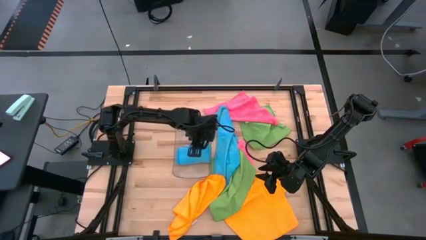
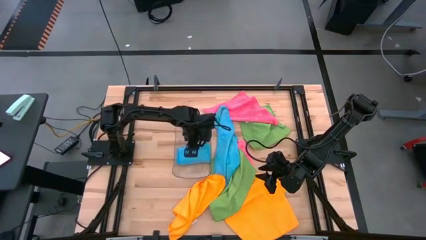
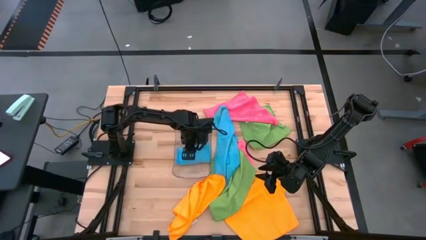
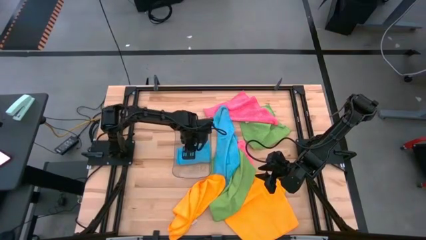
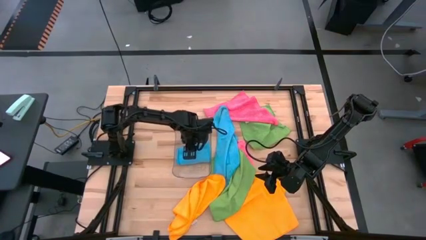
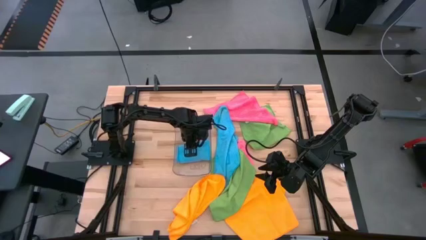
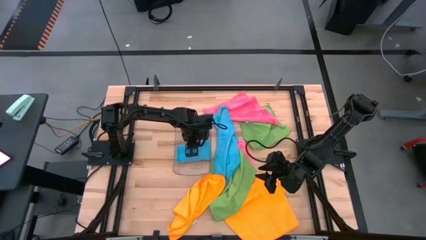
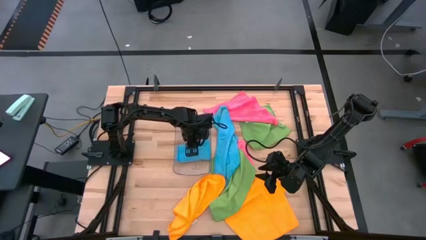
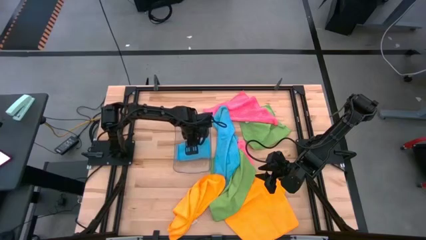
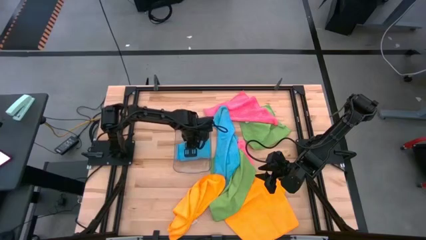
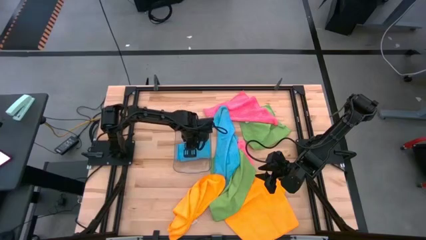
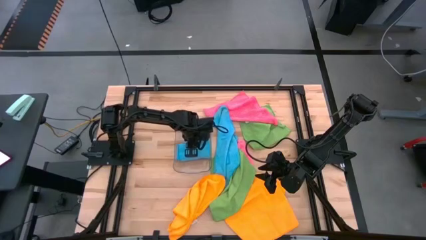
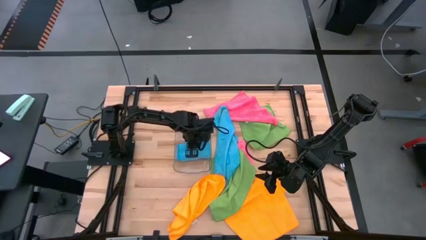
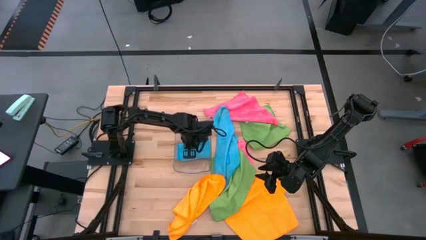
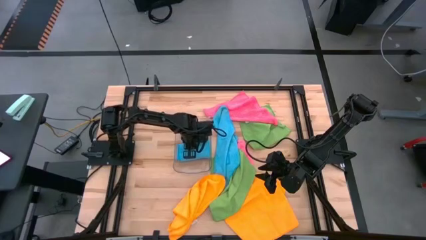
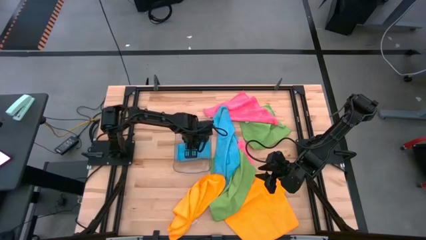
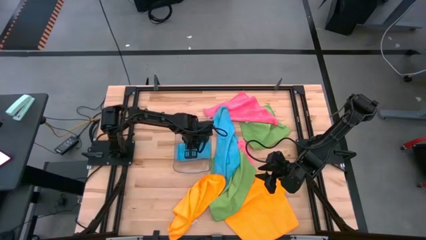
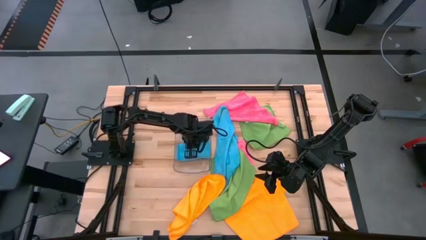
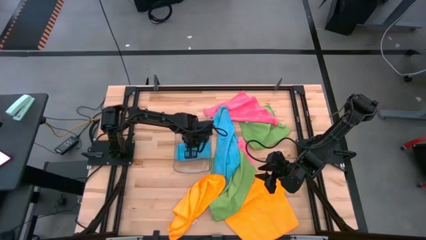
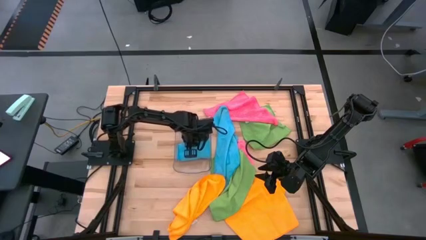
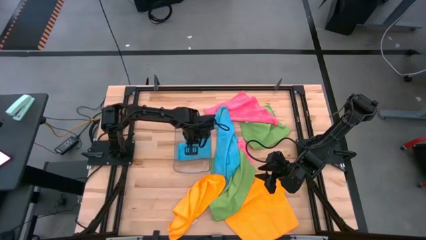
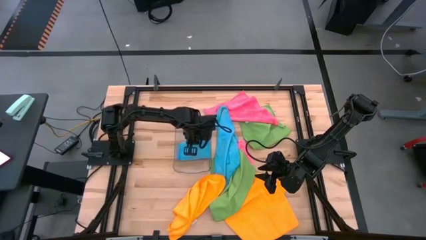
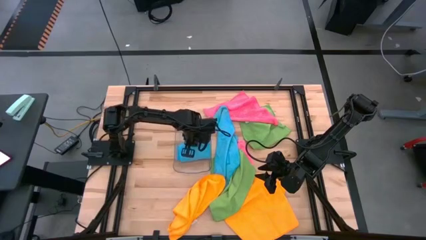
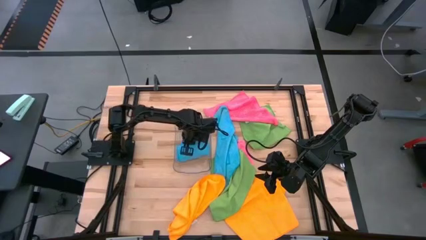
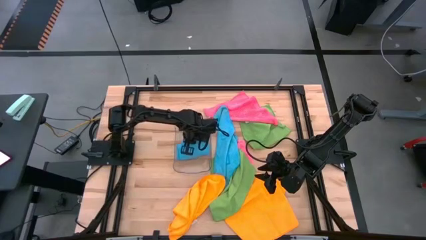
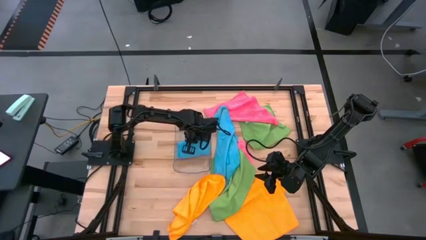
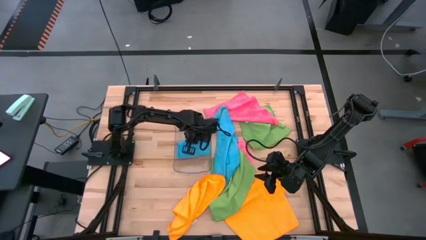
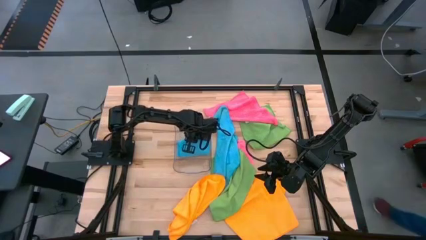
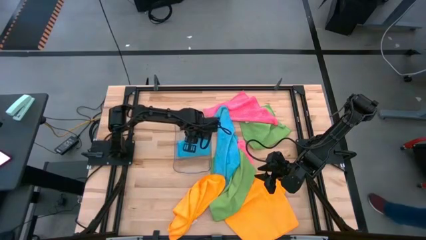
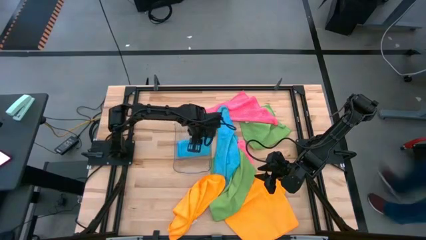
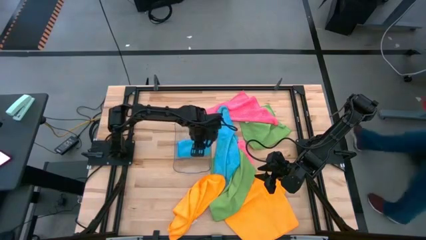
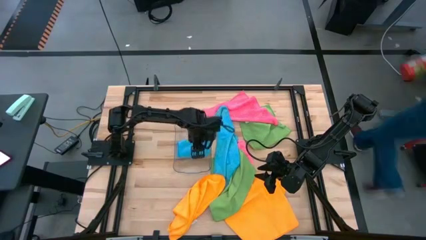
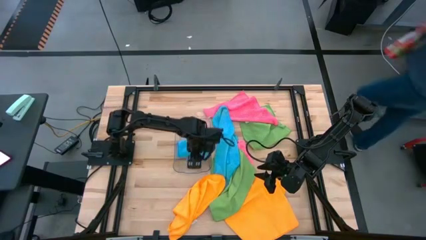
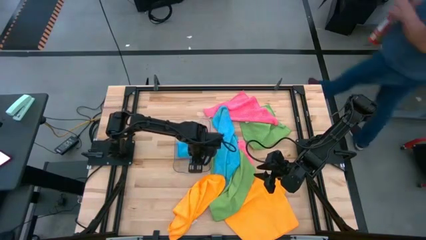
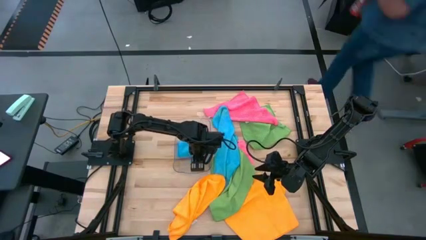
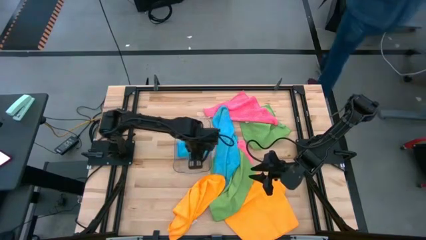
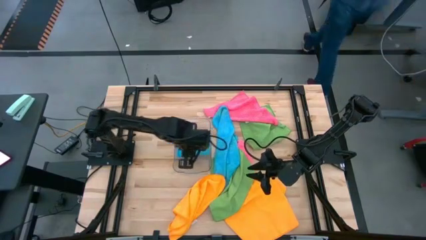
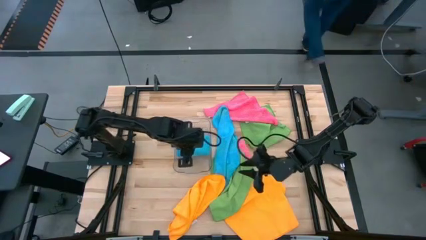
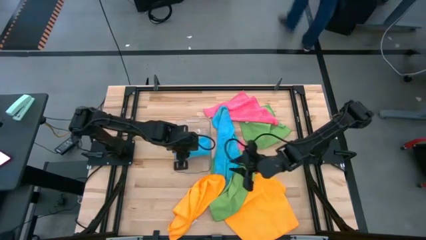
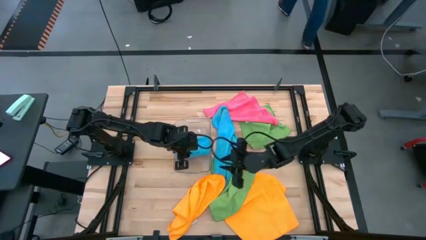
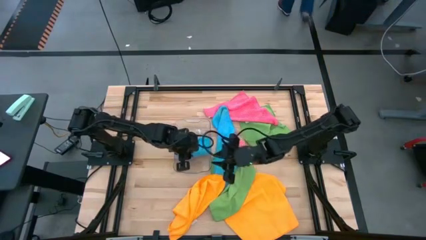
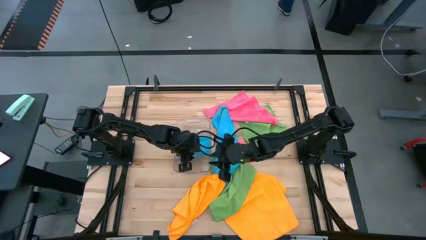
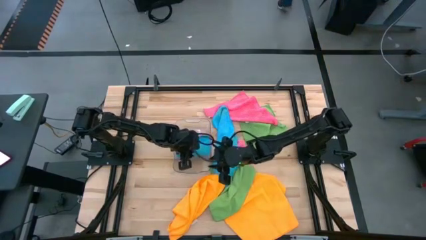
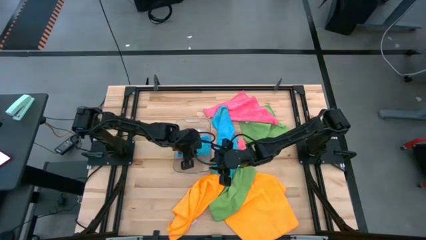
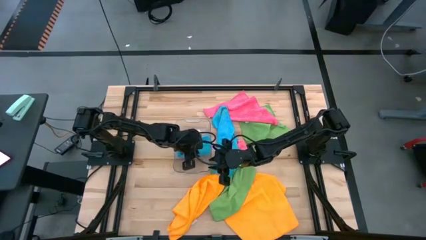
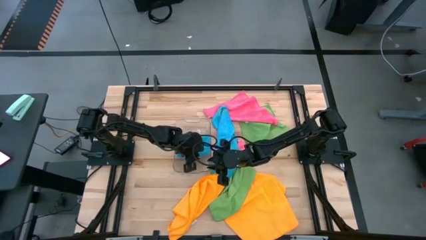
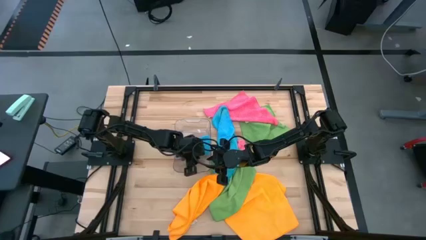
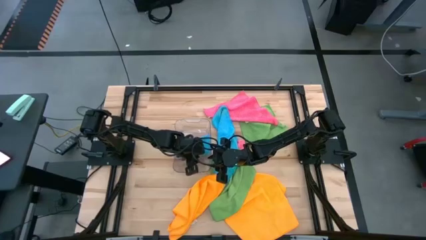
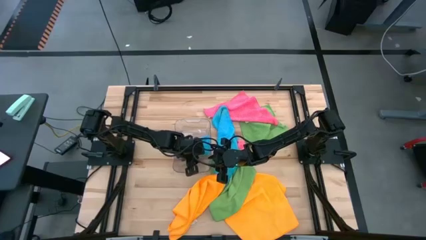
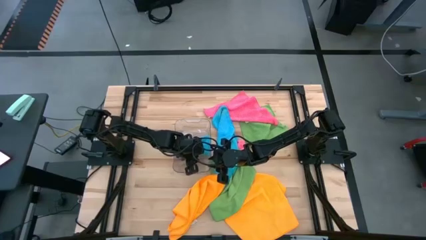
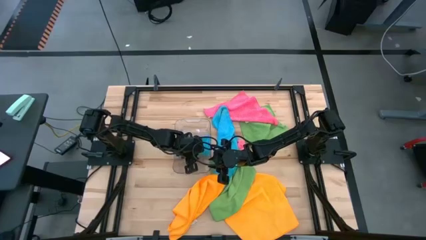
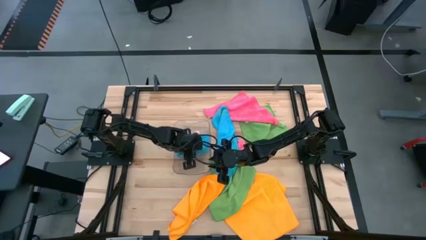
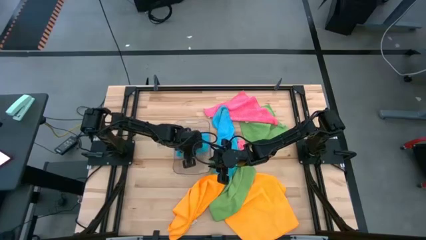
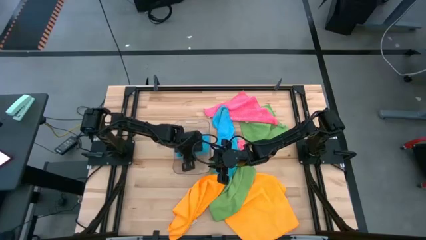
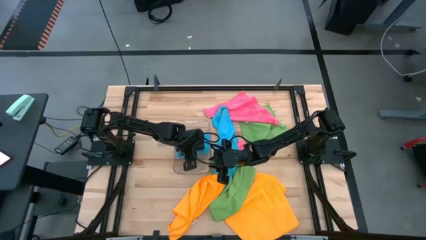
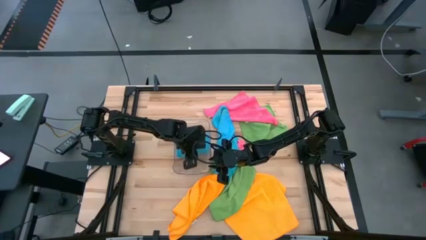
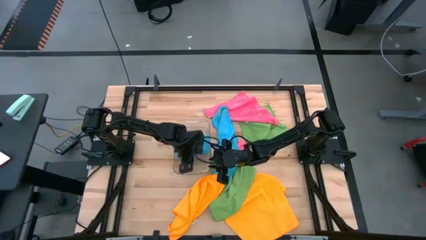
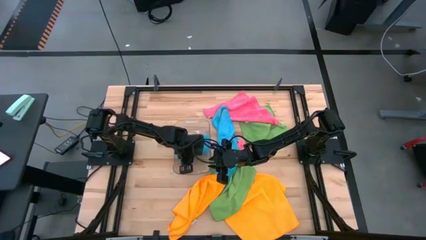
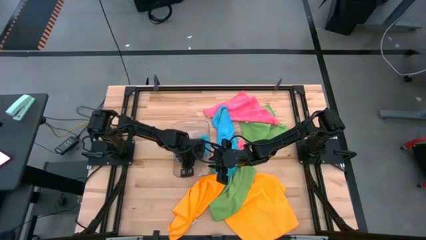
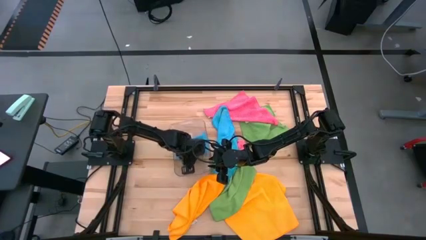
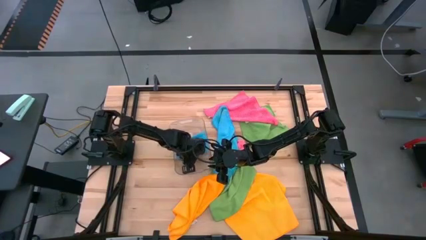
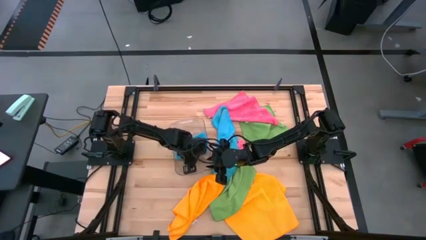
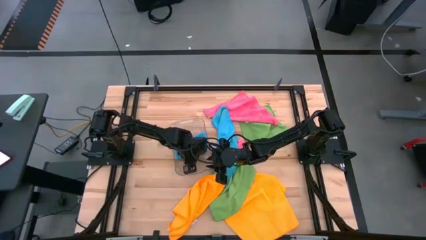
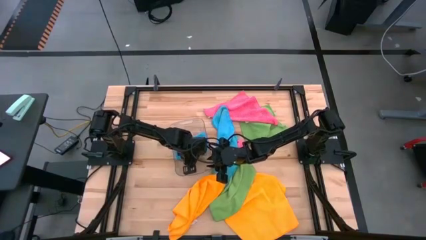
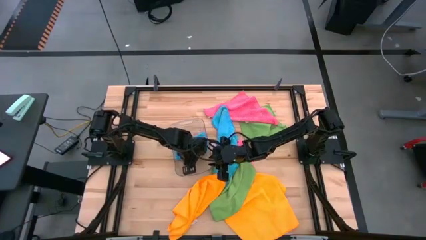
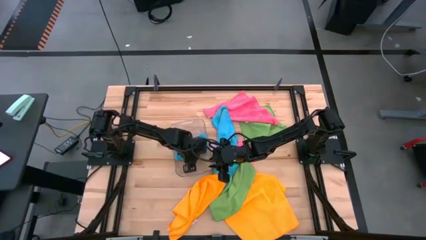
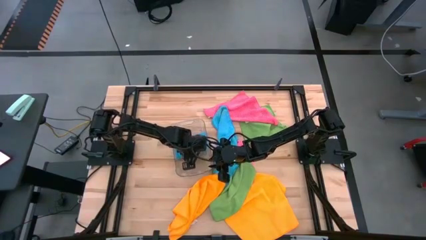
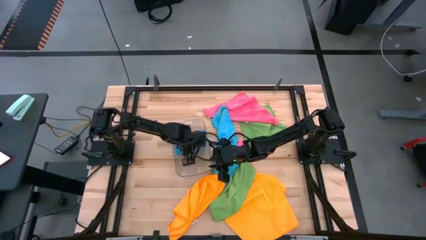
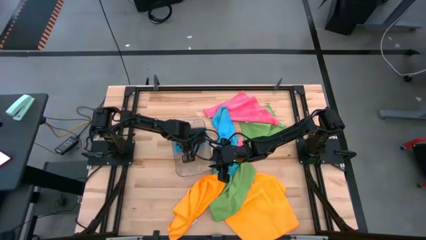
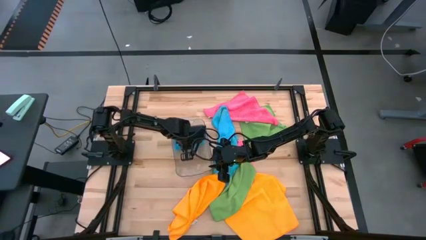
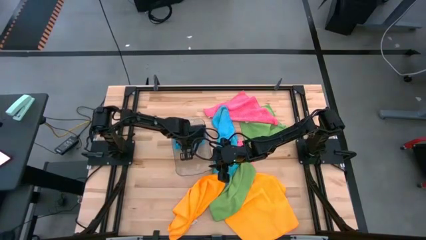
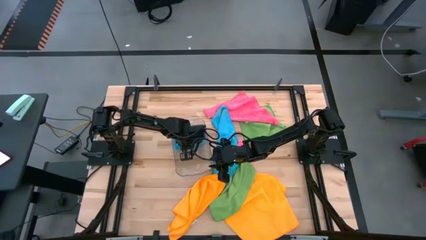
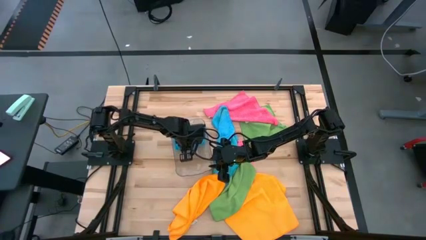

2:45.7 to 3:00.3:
Task: Fold microfiber towels
Put the left blue towel into the transparent bin
